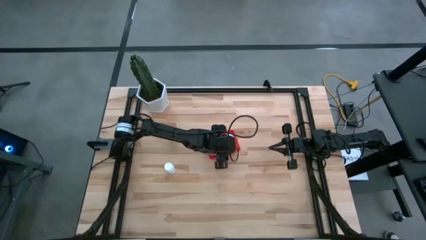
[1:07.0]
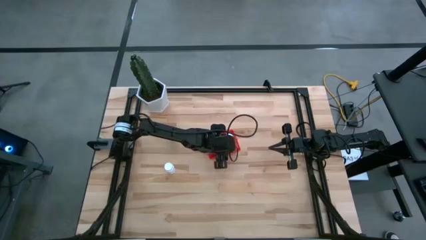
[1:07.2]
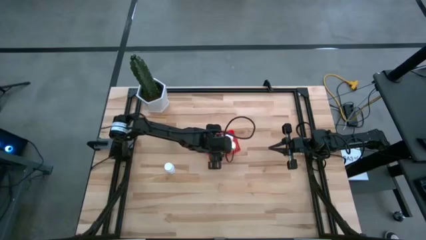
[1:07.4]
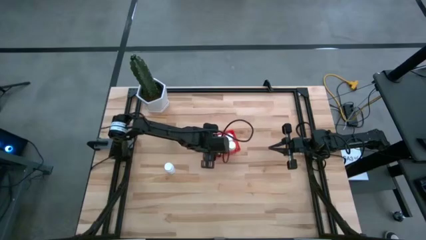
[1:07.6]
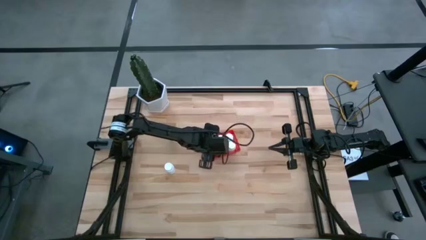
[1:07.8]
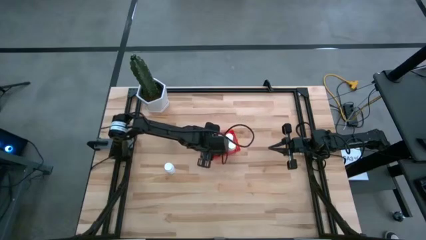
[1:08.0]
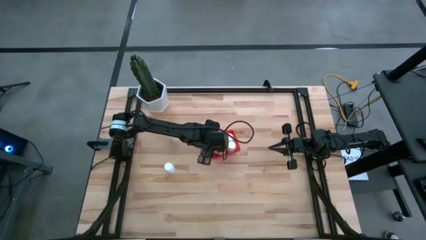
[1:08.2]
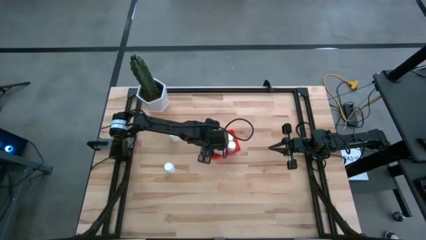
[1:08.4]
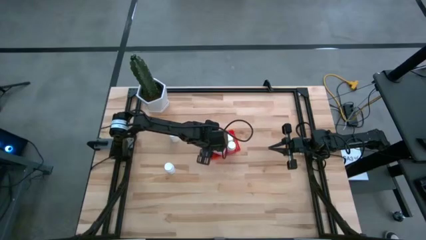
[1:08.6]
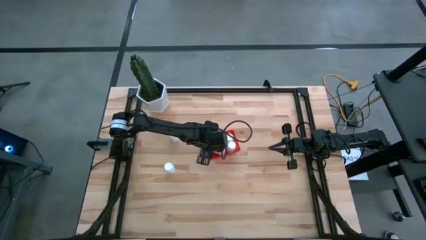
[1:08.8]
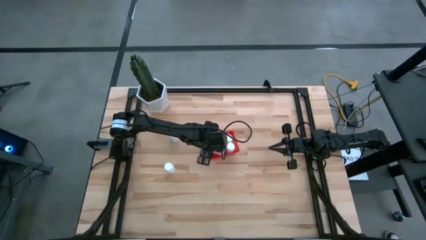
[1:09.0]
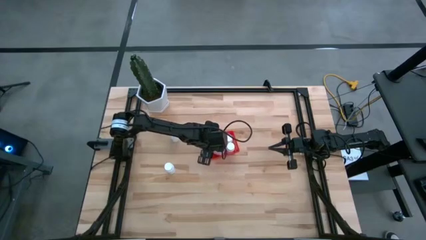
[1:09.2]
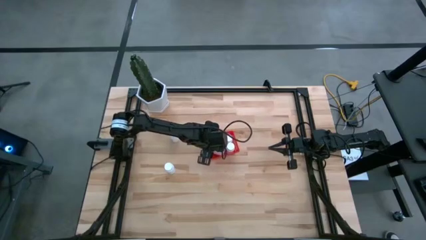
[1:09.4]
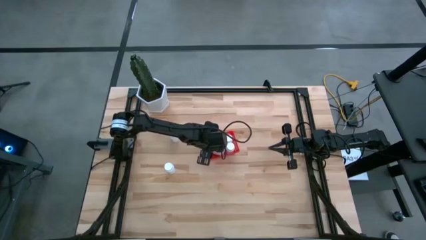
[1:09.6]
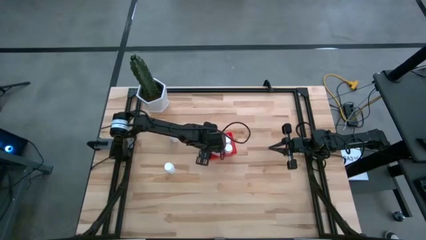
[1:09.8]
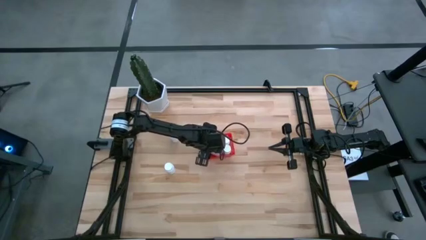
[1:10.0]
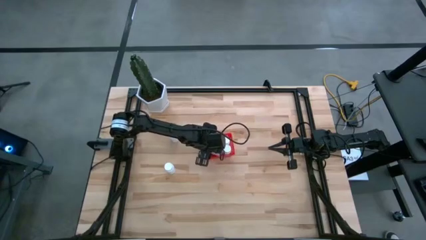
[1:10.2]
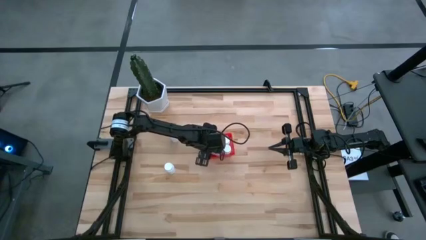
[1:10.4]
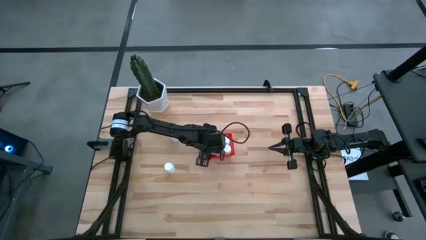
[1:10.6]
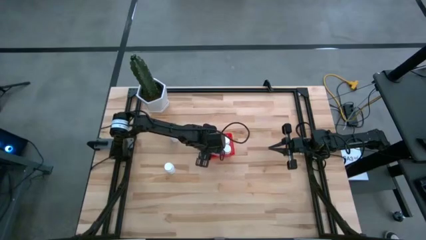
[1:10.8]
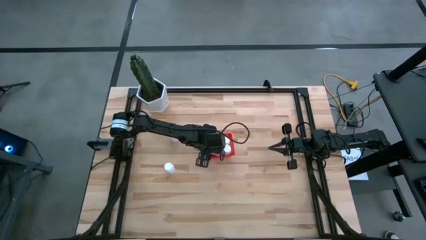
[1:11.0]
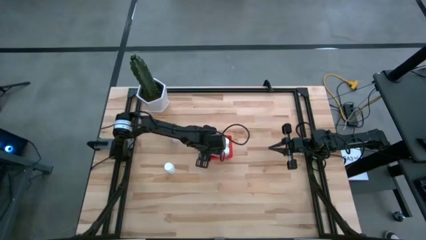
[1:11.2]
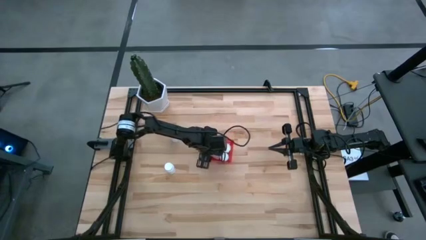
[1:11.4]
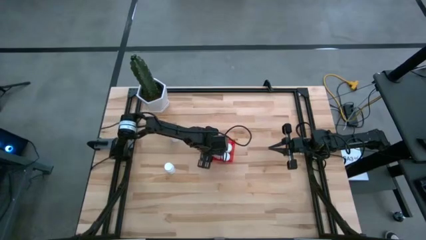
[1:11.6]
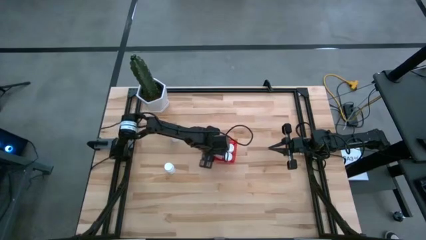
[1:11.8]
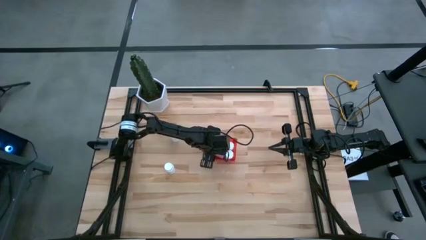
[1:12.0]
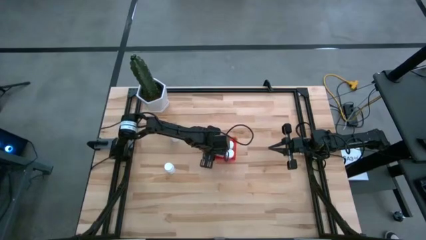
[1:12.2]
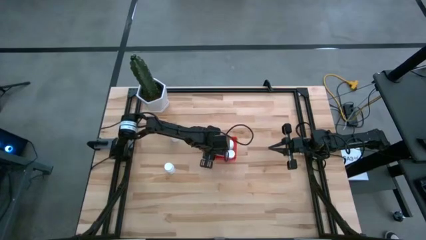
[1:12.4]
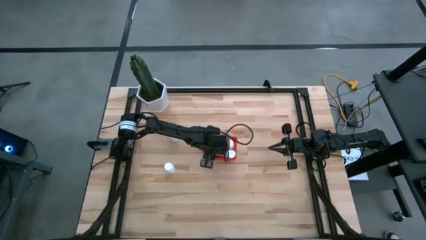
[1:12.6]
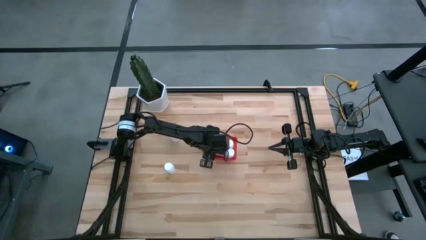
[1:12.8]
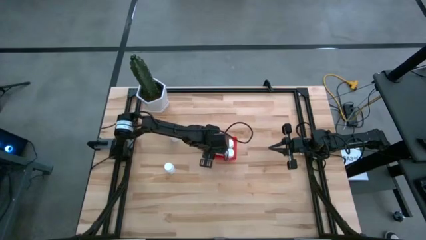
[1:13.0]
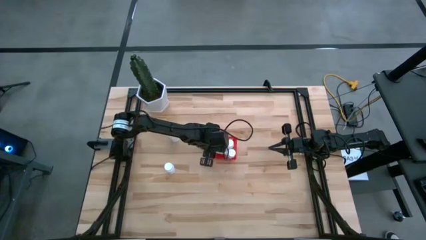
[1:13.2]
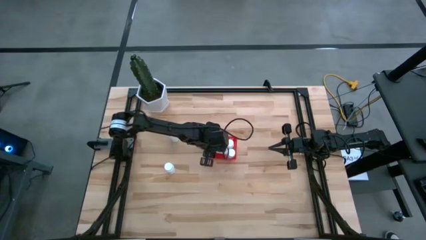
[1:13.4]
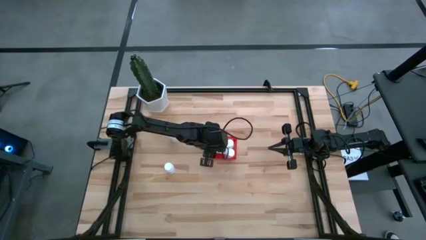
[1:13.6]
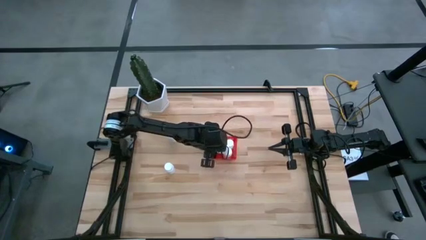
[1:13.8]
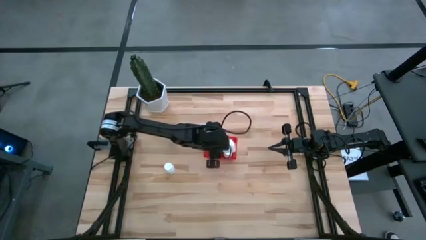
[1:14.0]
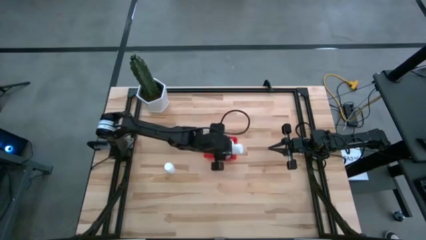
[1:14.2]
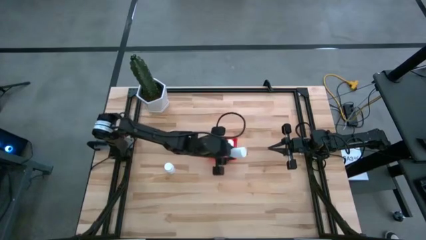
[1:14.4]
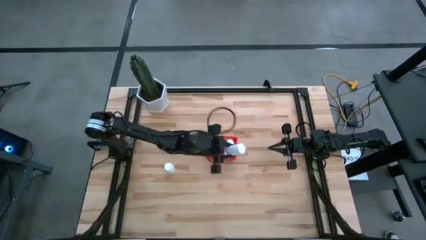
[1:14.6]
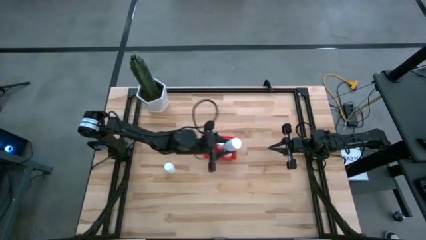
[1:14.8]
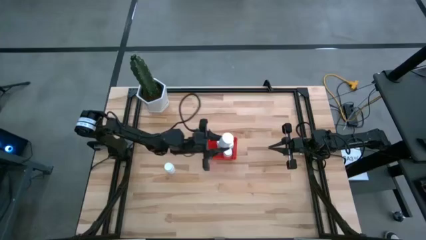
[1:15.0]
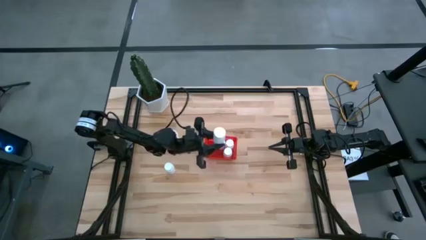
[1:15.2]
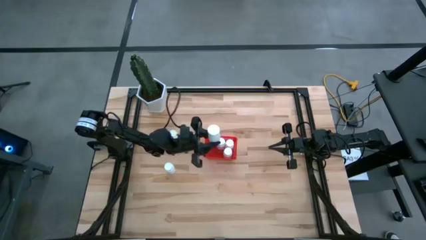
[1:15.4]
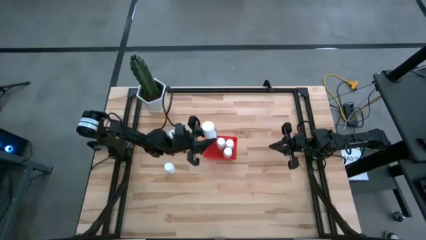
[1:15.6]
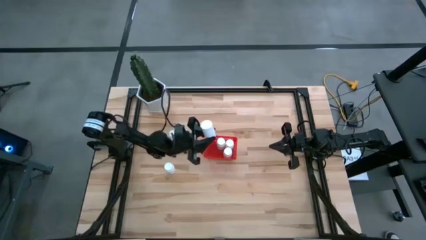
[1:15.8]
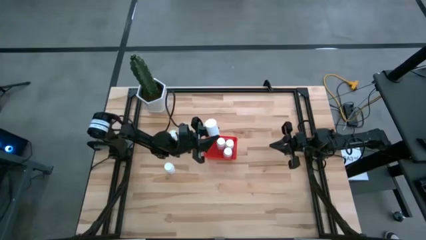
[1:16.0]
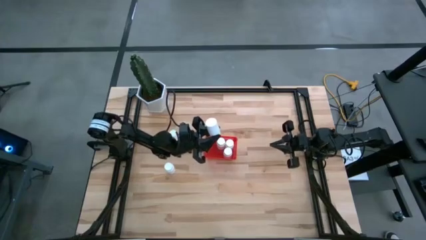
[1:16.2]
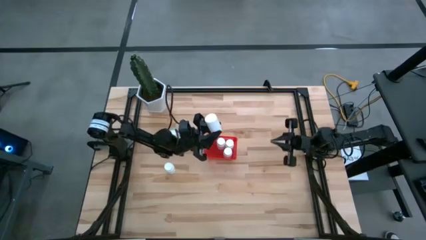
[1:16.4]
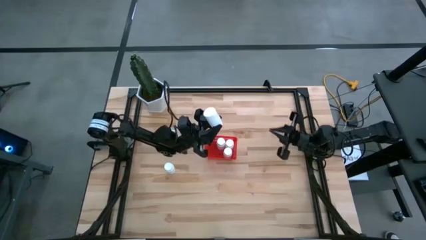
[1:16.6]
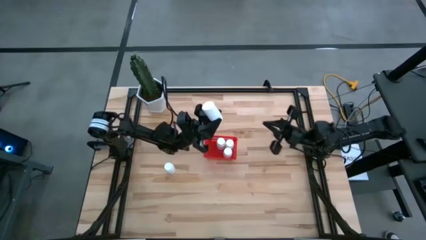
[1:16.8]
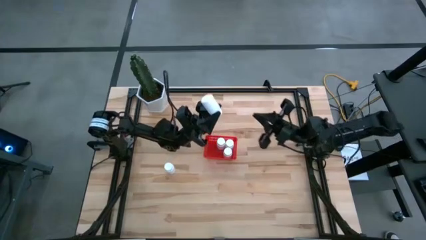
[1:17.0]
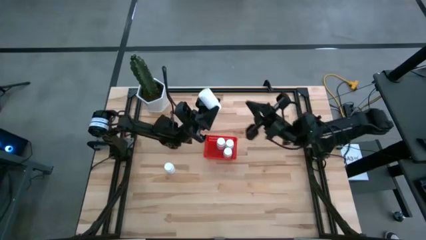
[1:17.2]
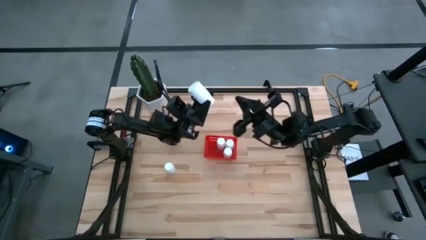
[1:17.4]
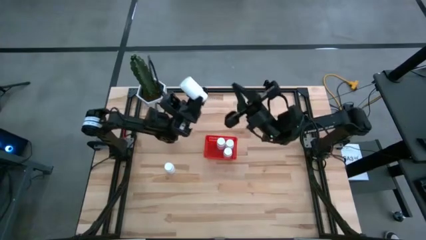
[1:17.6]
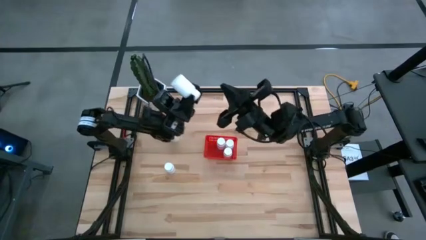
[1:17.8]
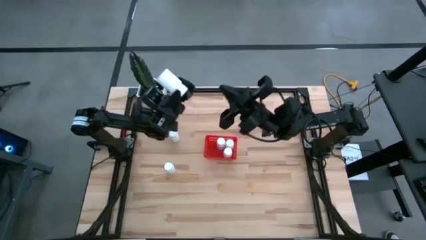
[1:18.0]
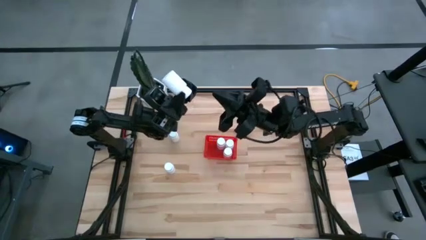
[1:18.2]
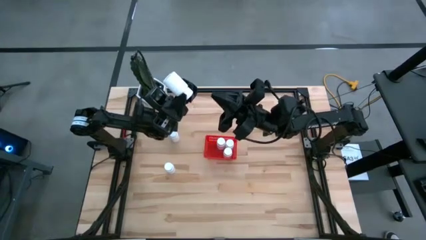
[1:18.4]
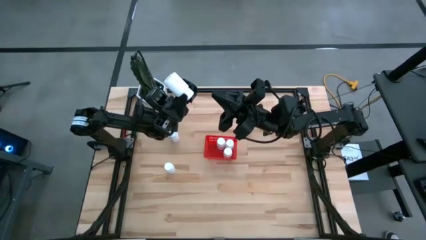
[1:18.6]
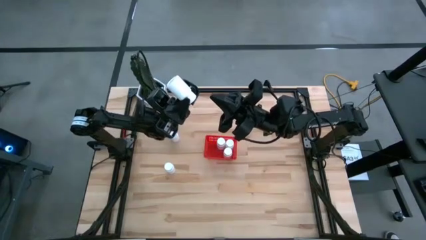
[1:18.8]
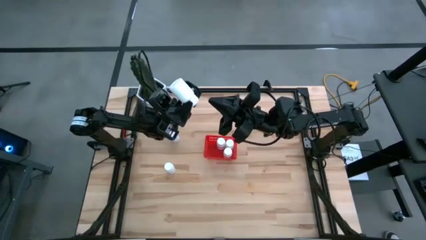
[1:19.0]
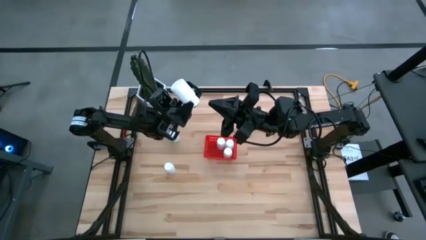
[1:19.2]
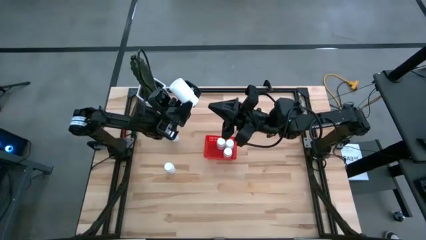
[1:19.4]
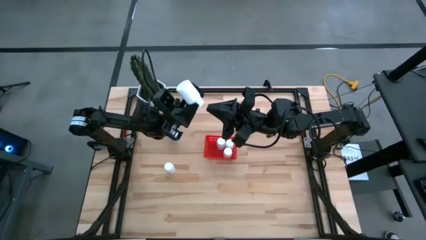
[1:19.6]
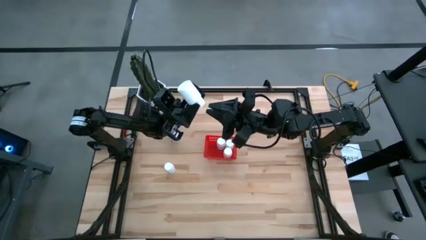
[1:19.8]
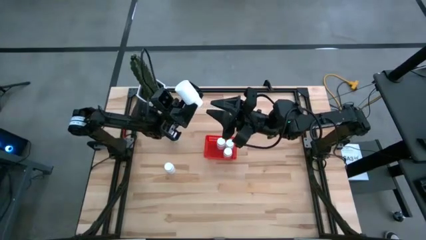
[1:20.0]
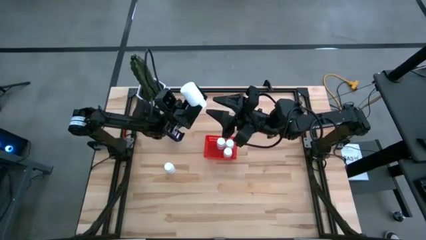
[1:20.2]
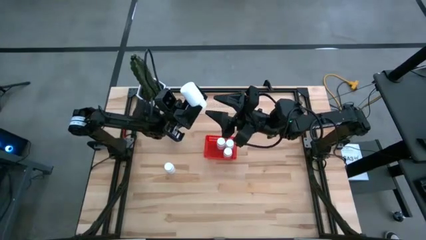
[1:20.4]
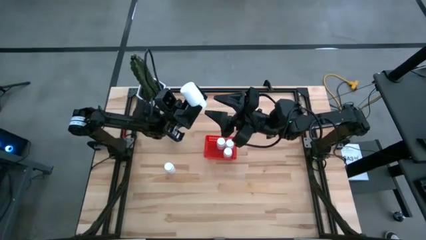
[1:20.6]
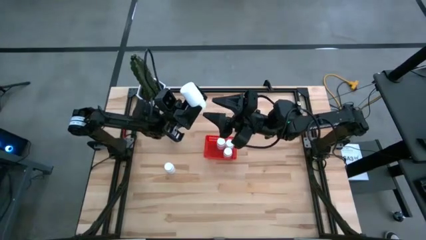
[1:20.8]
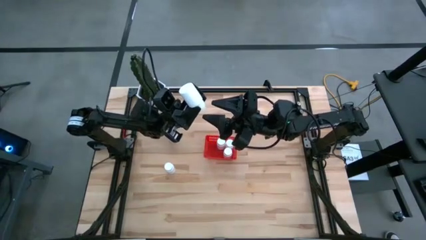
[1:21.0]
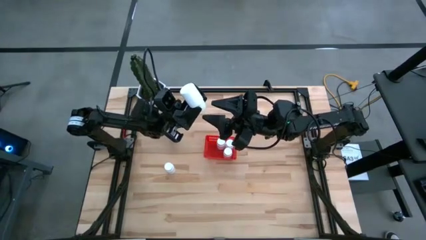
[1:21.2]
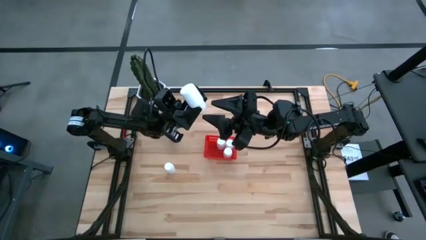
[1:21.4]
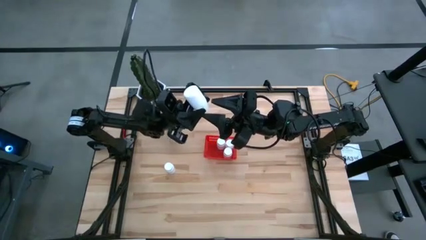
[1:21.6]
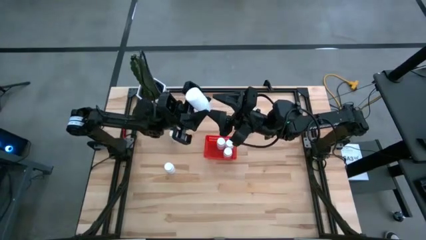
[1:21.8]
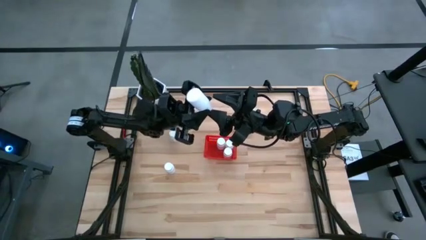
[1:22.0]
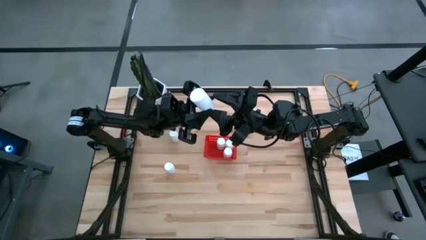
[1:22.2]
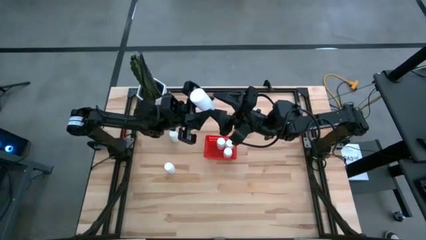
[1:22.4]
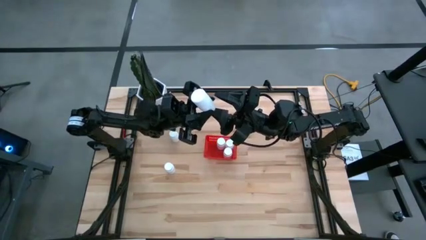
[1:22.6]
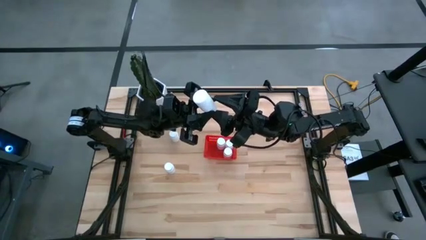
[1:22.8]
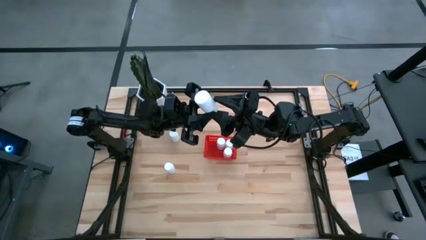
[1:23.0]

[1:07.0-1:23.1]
Task: Pick and place pill bottles into a basket
Put the white pill bottle into the red bin
